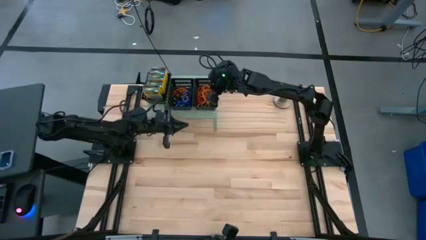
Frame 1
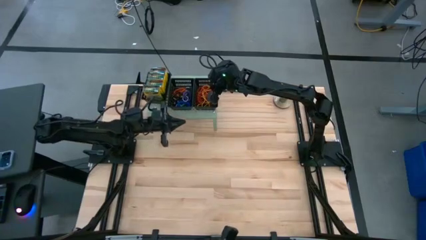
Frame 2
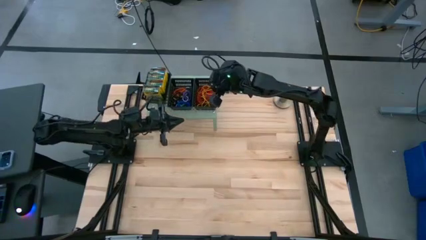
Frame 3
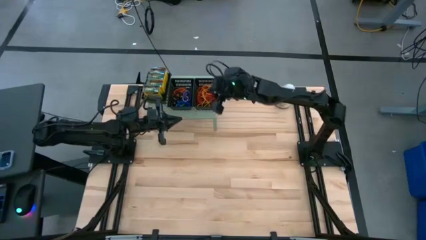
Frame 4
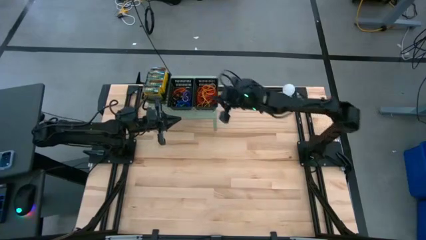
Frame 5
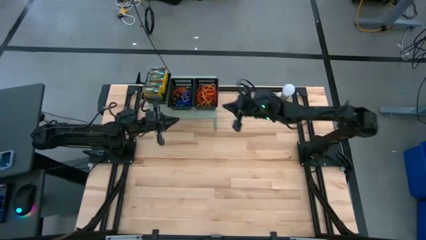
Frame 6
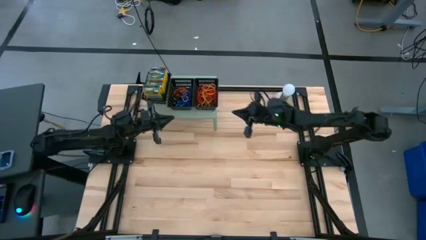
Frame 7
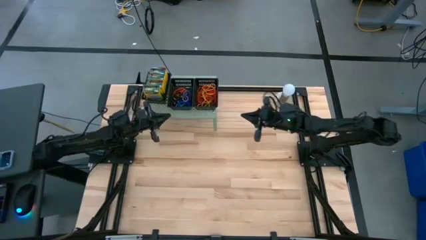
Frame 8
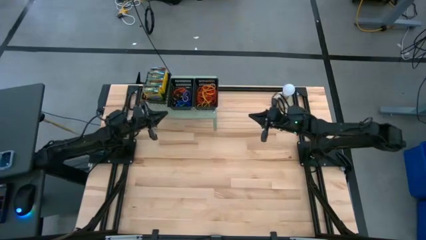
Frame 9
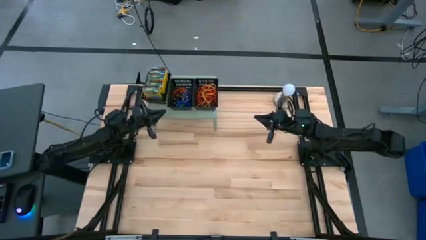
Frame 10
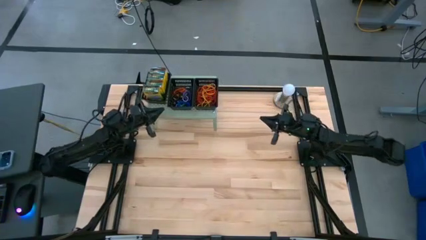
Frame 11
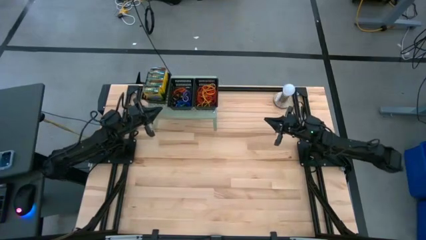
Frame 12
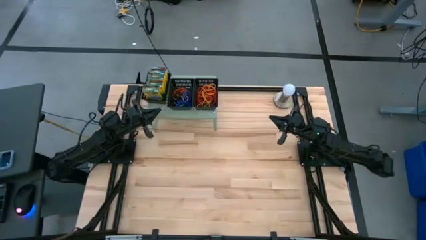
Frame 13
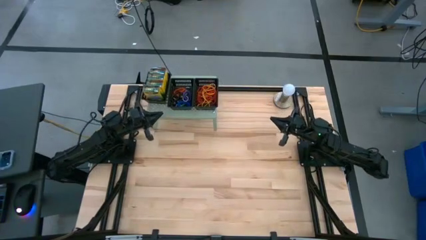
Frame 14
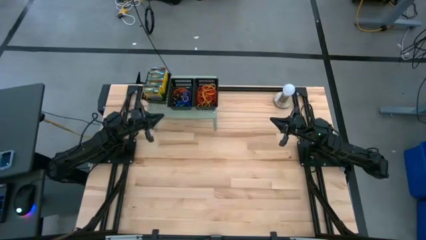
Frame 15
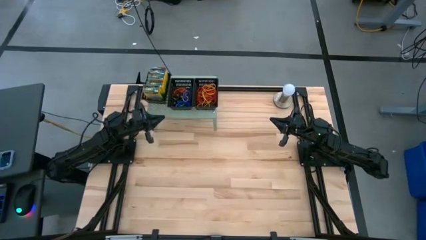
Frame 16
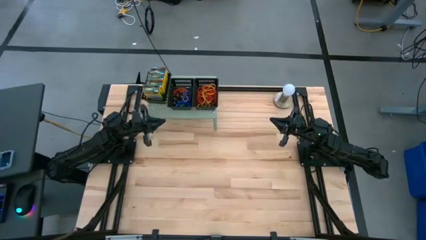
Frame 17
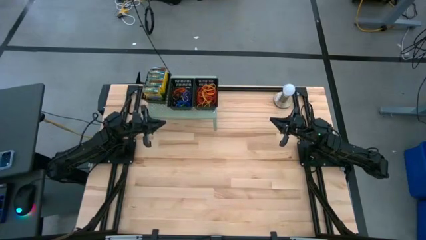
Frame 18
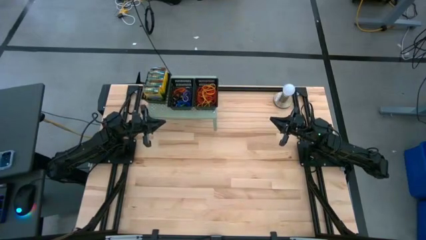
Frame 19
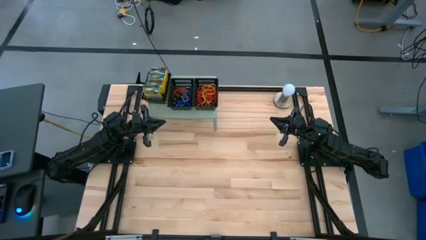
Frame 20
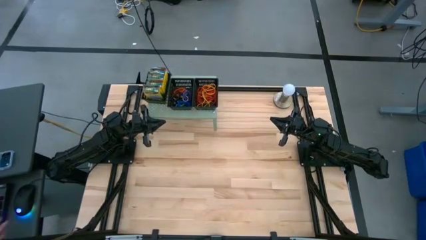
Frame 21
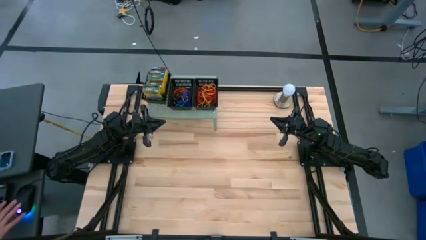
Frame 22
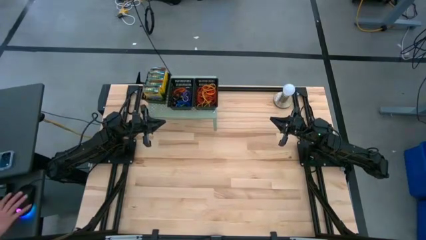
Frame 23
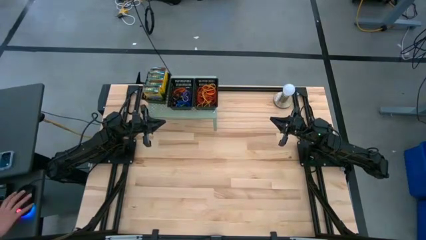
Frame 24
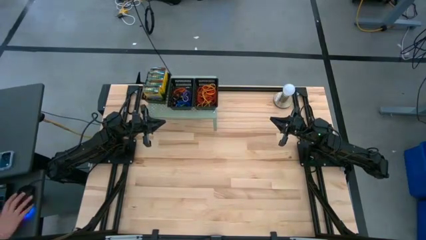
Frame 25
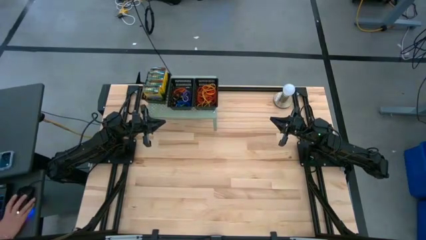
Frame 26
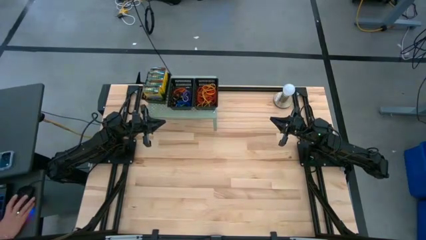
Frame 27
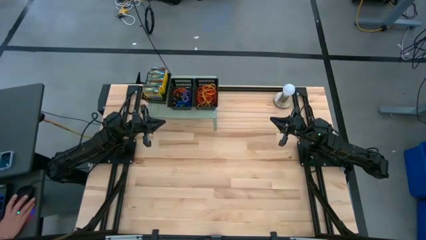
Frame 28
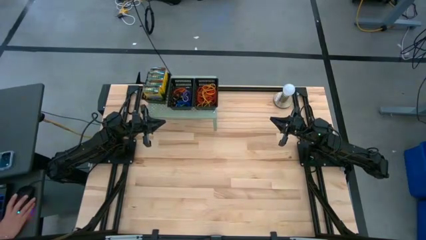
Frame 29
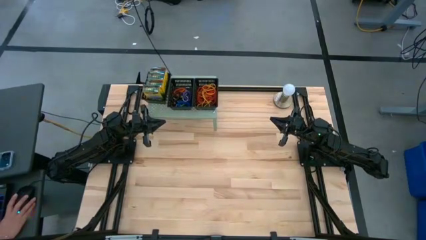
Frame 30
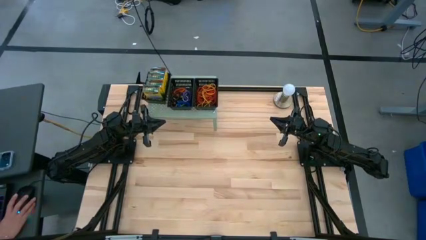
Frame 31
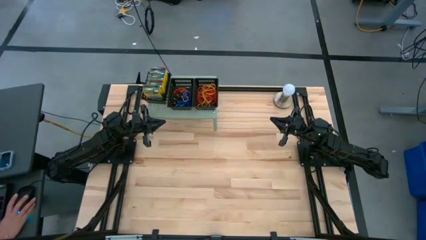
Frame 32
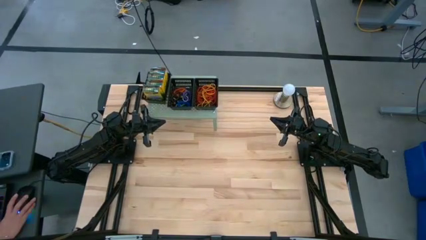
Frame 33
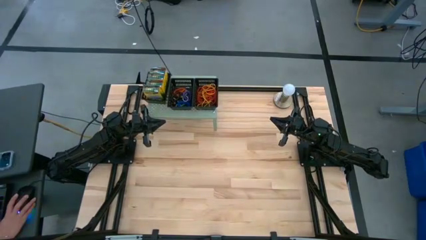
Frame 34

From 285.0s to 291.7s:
Task: Pick & Place Office Desk Supplies
Return to Home Position

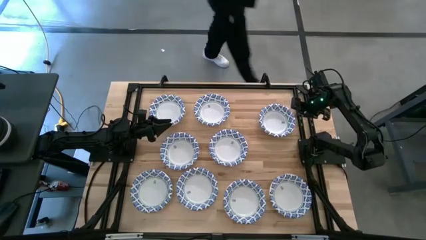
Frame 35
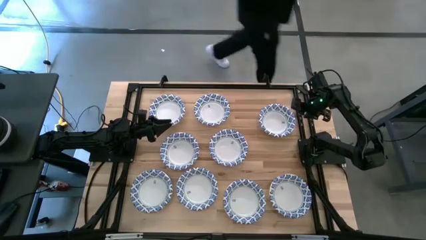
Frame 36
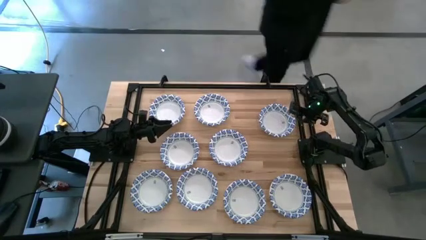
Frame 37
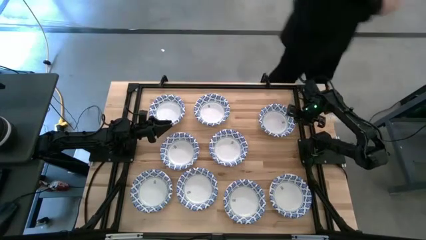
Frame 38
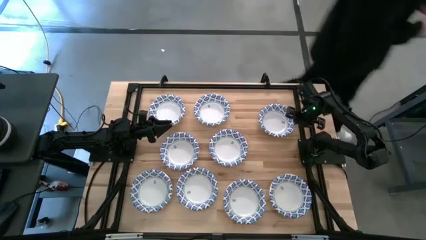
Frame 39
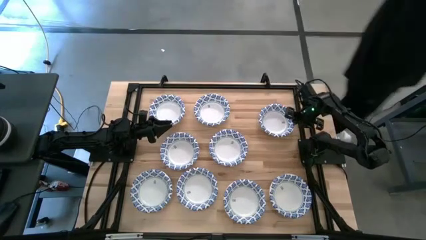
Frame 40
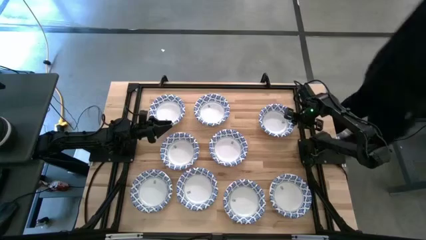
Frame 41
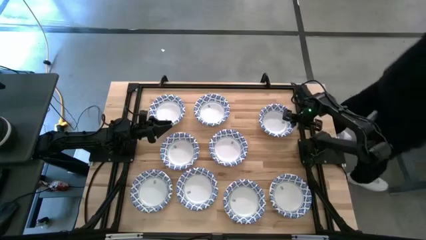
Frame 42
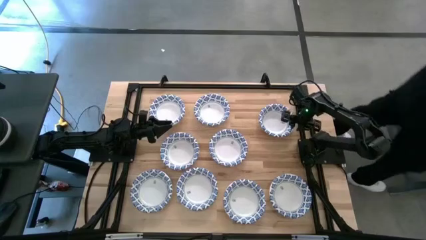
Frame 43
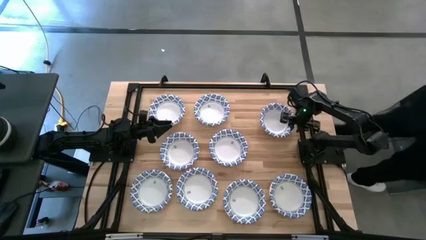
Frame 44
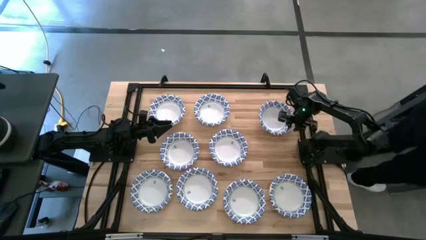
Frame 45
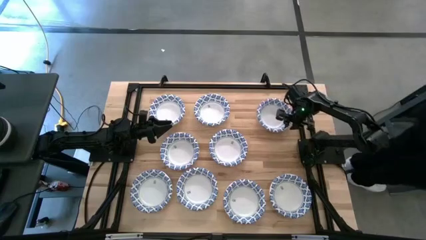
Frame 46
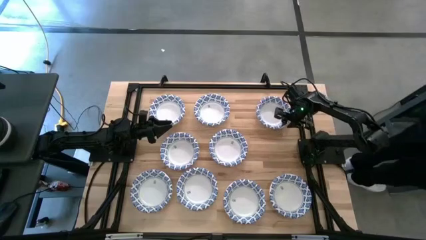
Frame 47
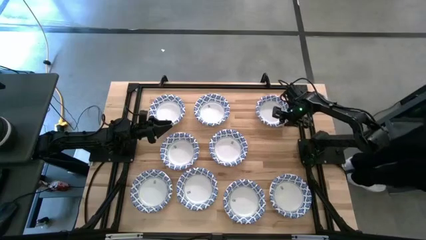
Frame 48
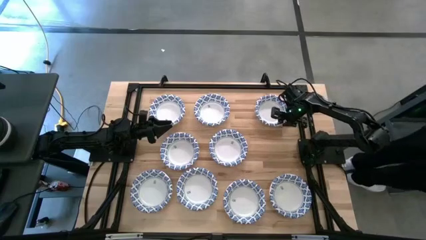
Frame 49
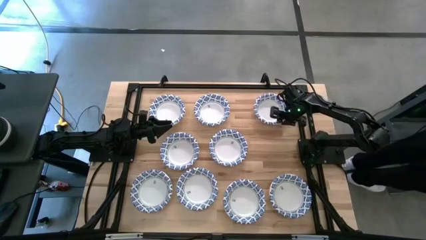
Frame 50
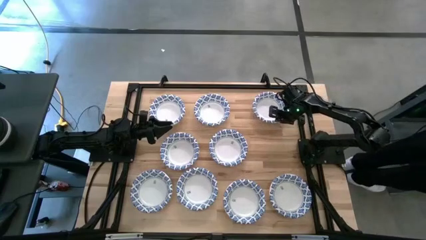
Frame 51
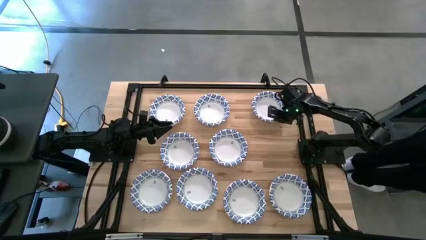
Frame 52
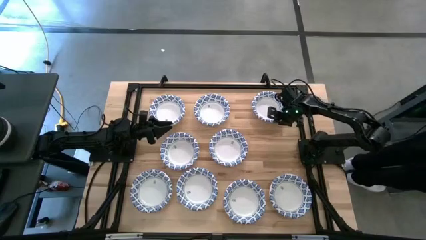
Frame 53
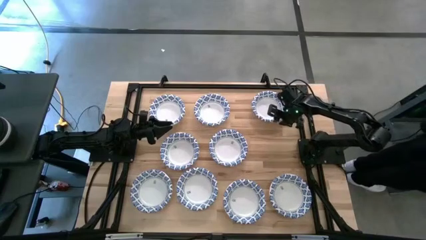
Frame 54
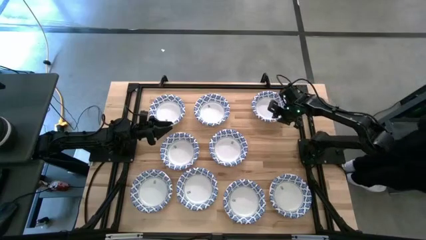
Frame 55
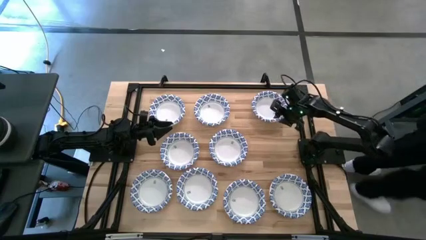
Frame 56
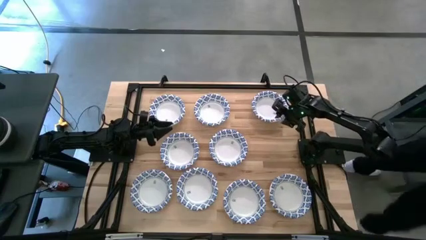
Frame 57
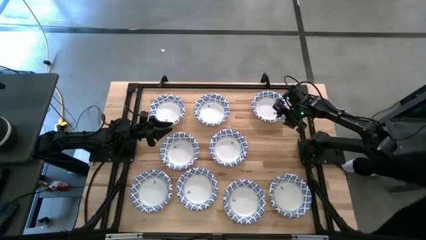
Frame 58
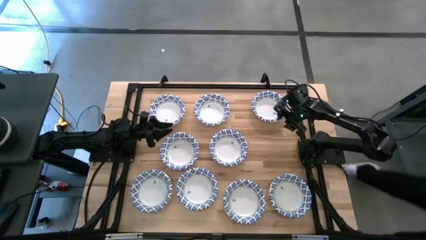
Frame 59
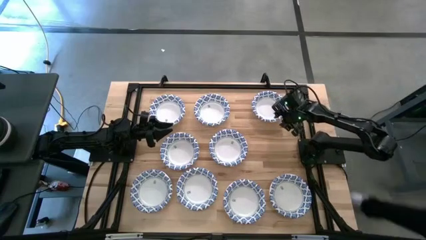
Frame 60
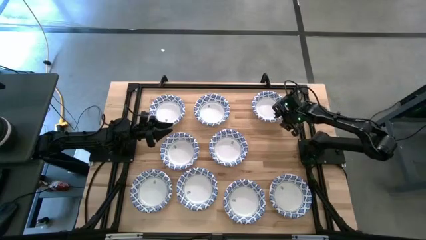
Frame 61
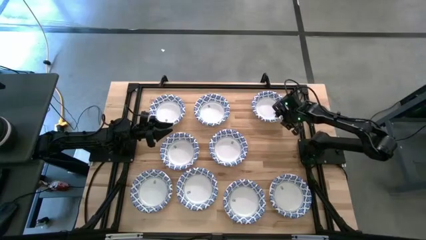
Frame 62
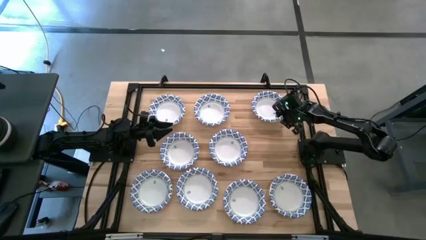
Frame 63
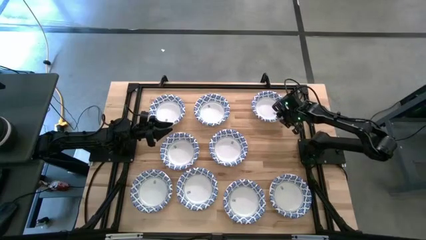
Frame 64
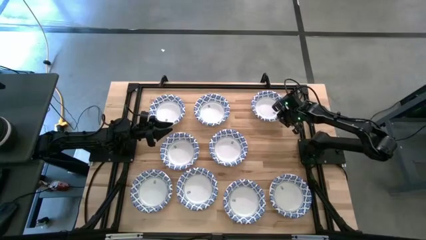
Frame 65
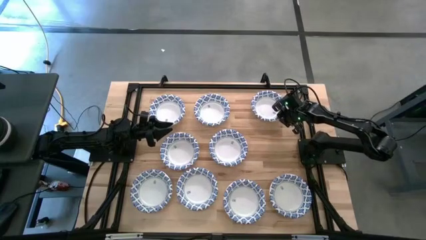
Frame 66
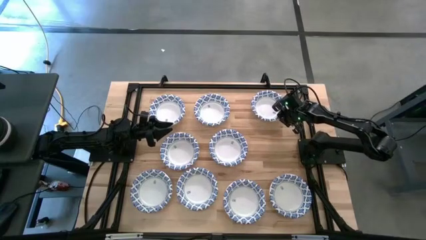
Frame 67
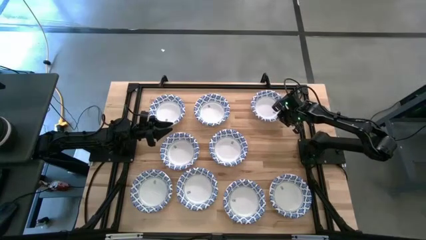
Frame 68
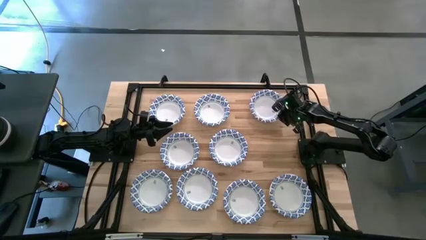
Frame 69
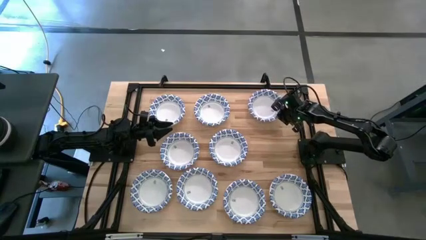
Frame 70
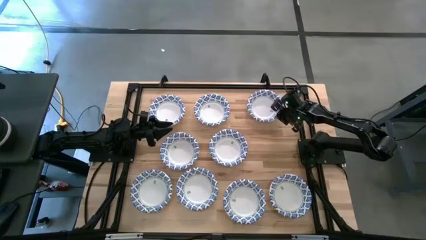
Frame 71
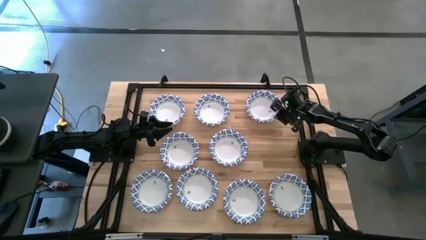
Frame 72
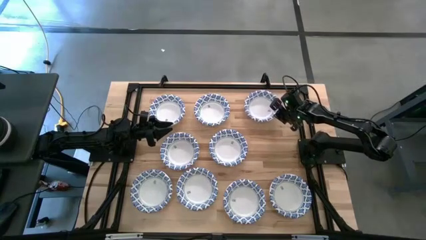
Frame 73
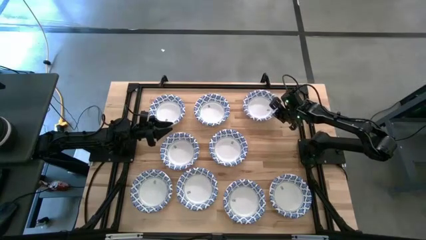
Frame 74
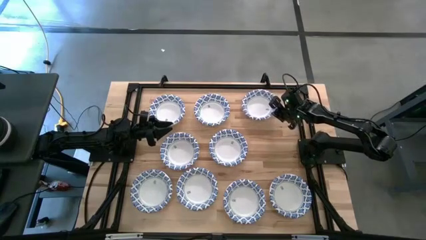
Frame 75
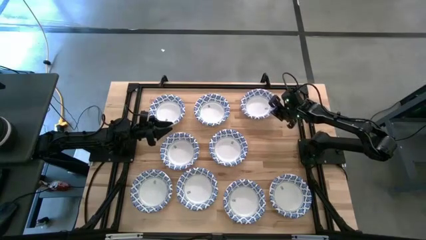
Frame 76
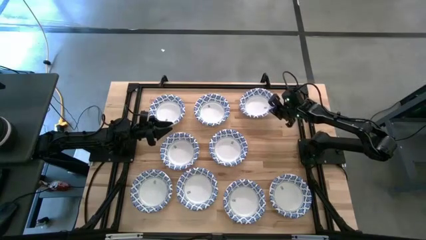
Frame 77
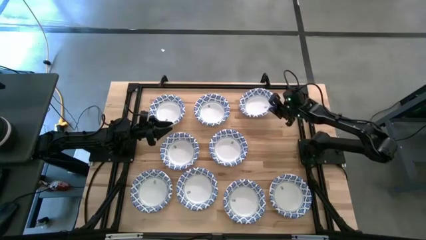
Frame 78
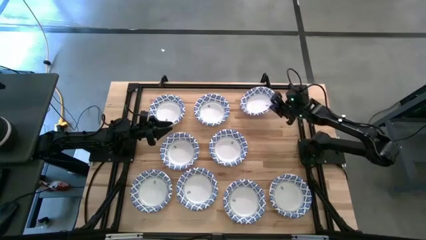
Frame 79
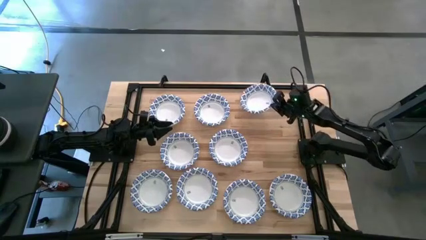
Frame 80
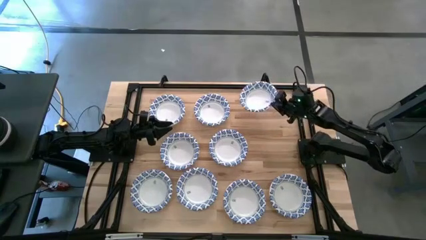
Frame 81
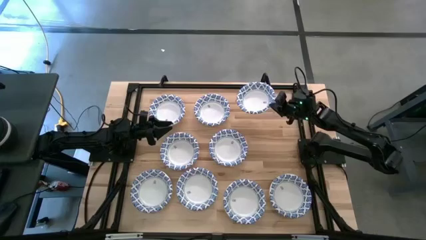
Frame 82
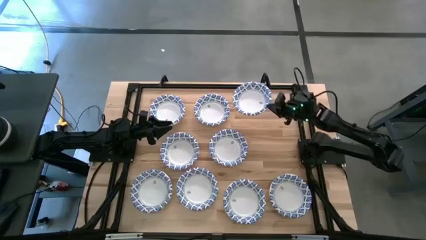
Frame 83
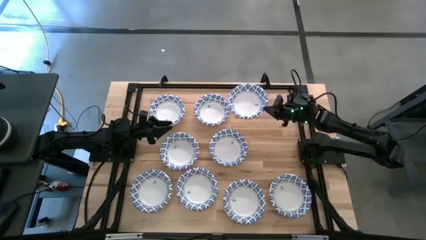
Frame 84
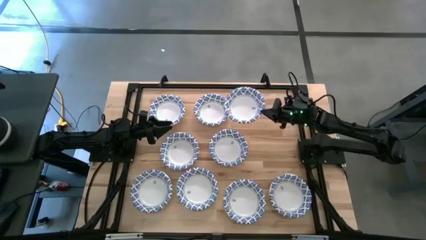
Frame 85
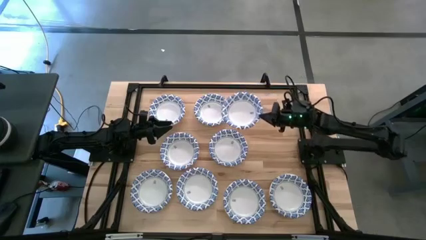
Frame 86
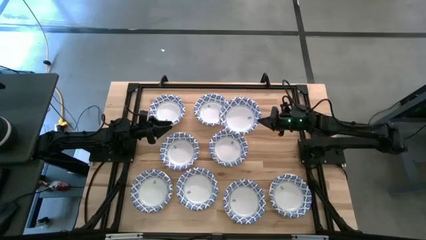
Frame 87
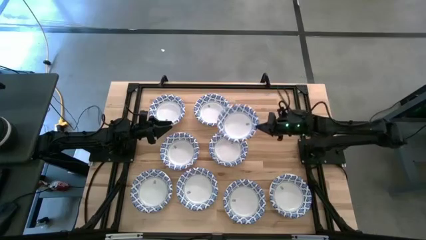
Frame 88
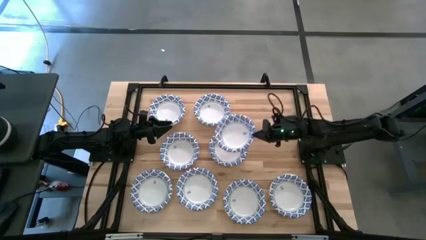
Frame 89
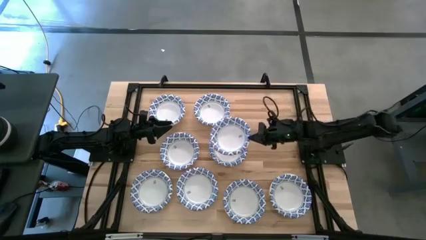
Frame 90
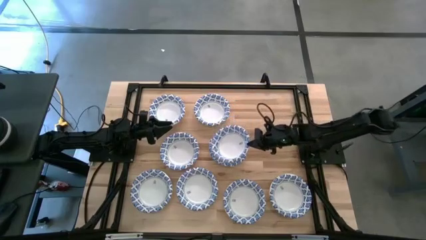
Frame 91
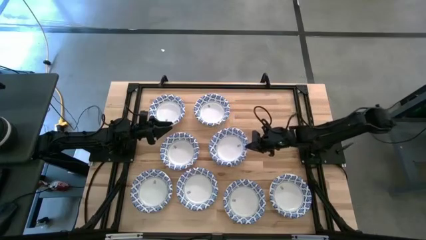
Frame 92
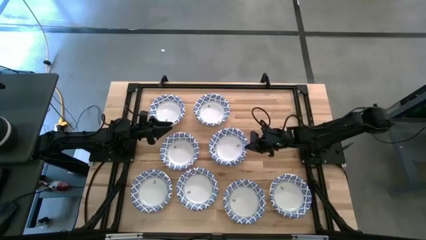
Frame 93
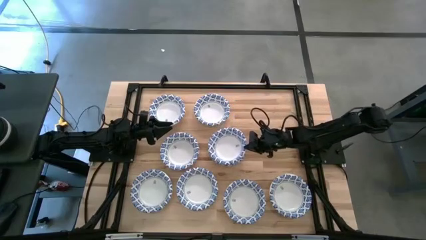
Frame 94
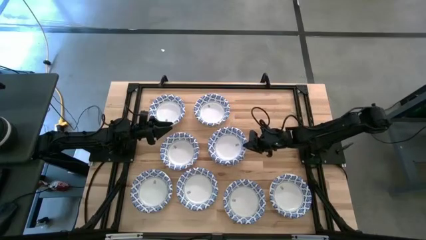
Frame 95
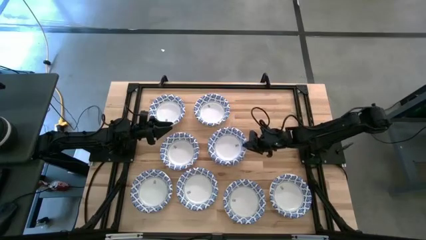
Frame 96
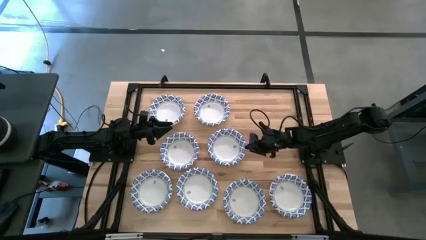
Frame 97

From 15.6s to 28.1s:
Task: Nest bowls inside each other
Stack the white patterned bowl on top of the other white patterned bowl
